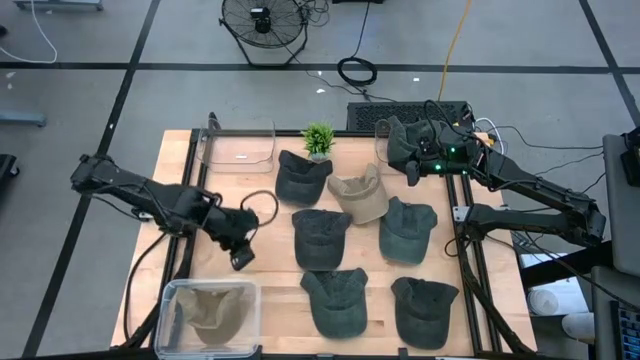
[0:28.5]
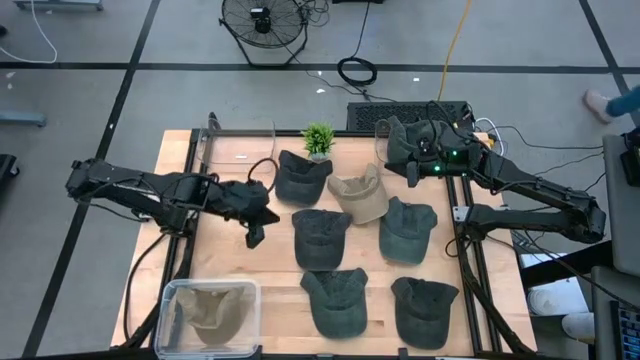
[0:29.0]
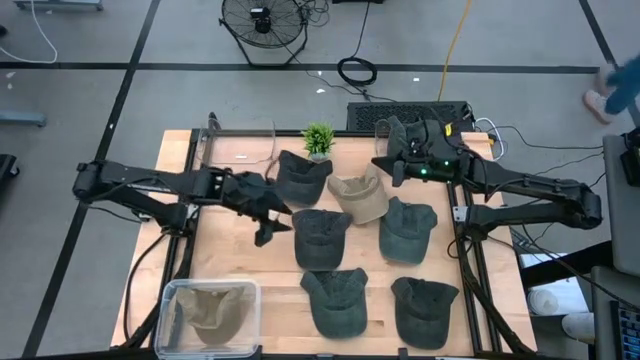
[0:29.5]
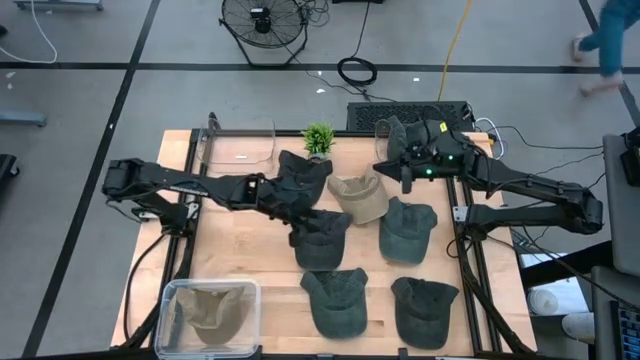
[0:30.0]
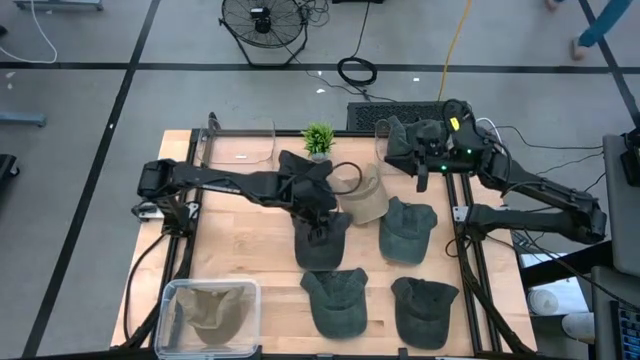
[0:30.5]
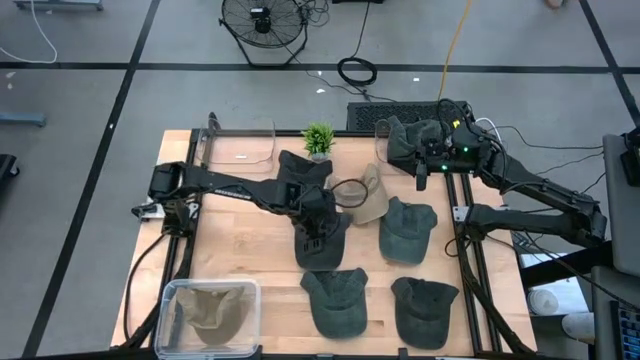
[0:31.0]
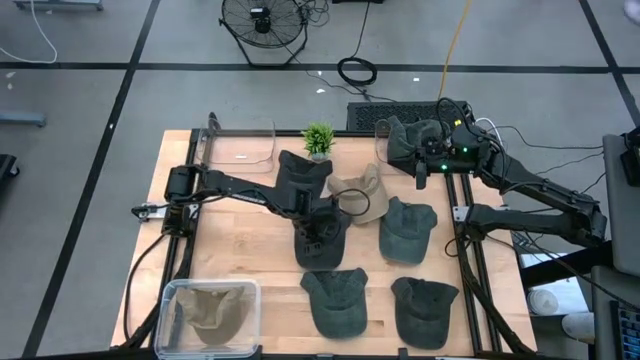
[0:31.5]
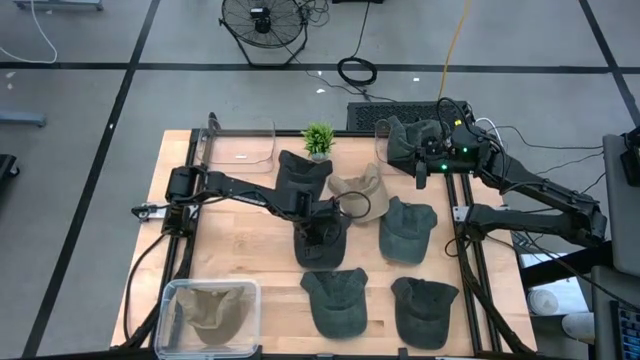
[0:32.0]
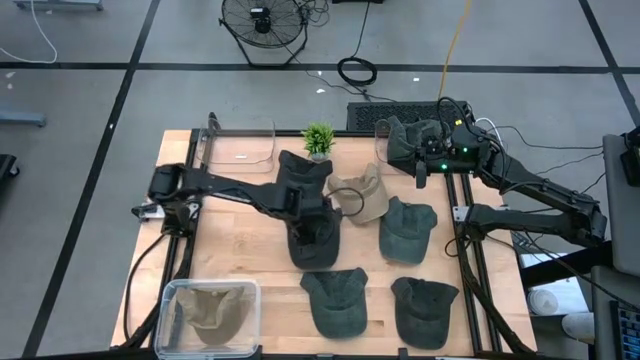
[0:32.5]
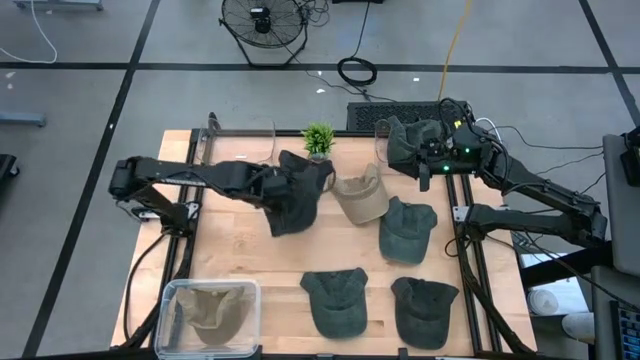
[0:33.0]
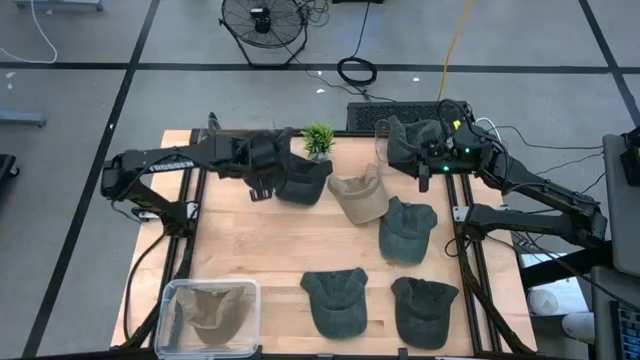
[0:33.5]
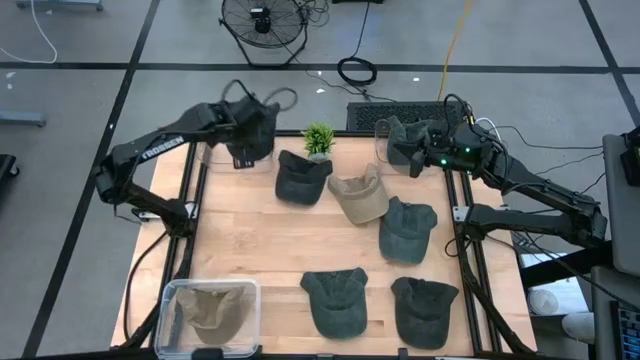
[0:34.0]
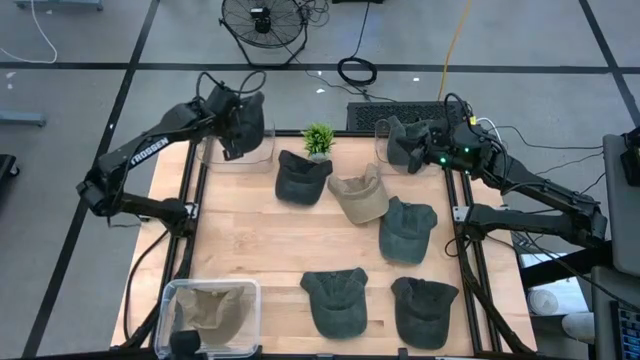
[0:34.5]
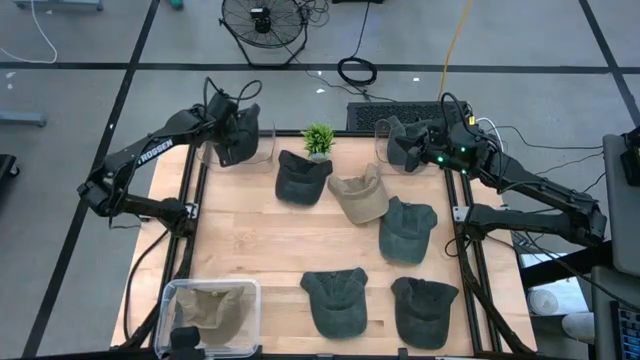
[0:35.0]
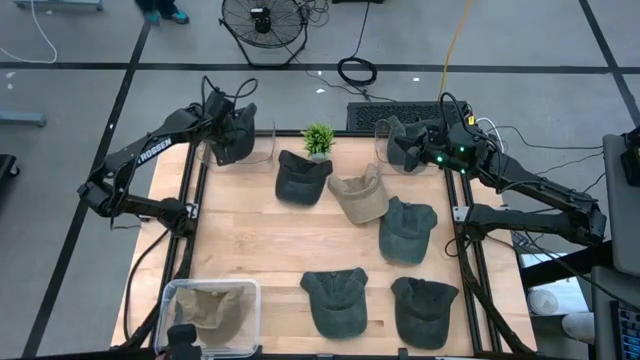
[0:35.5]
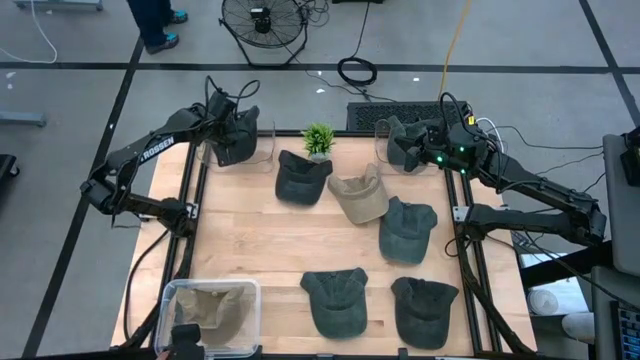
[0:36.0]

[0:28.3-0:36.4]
Task: Pick & Place hat
Put the middle black cap into the left transparent bin

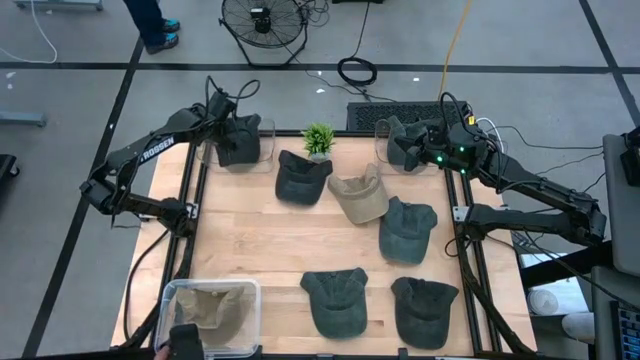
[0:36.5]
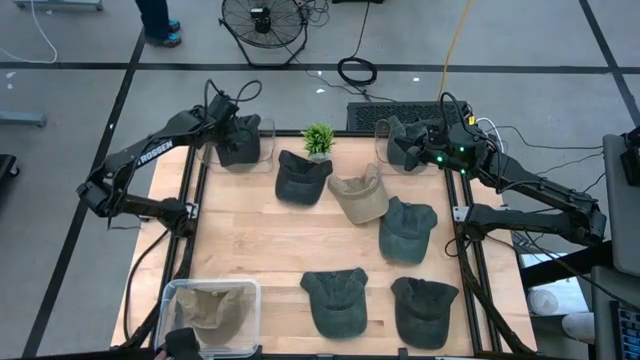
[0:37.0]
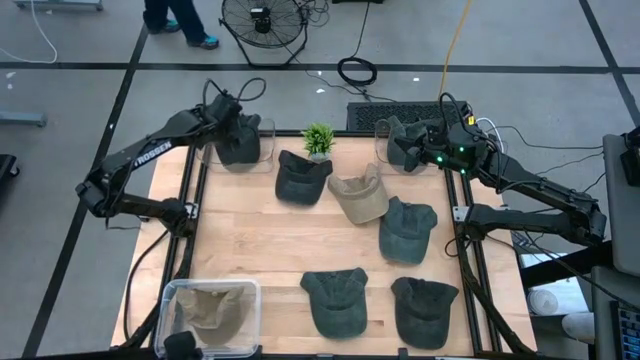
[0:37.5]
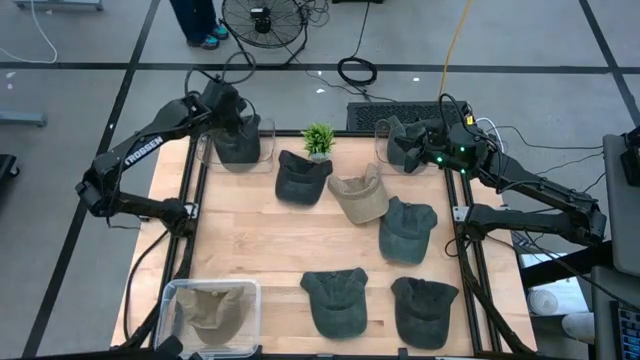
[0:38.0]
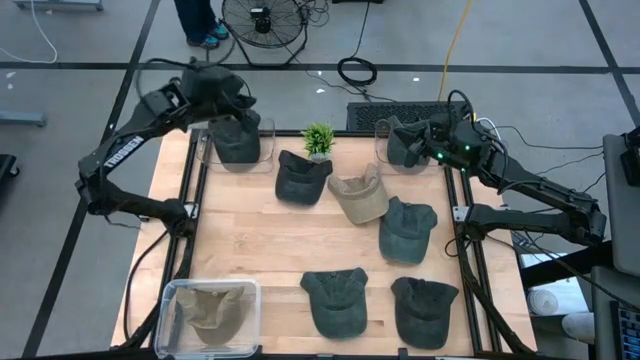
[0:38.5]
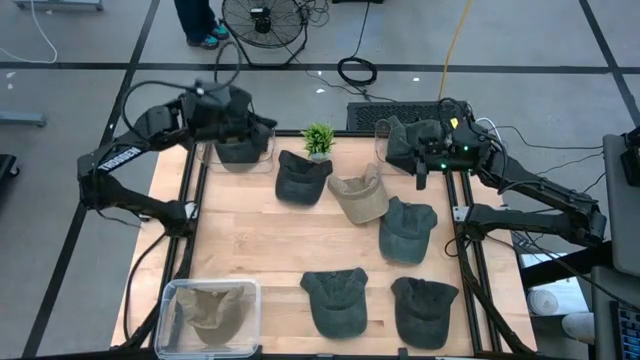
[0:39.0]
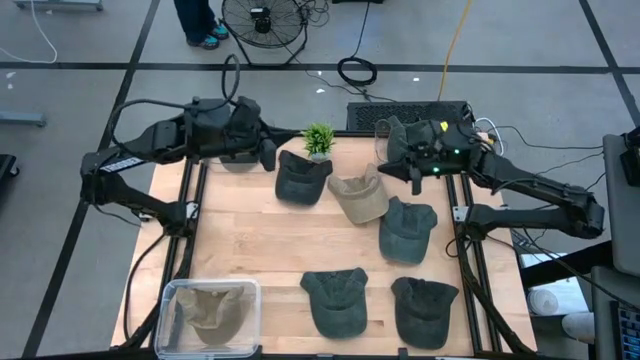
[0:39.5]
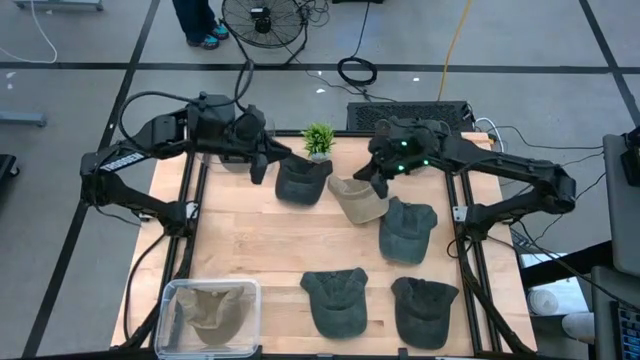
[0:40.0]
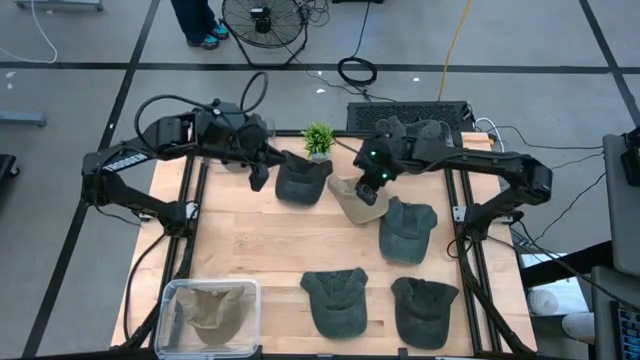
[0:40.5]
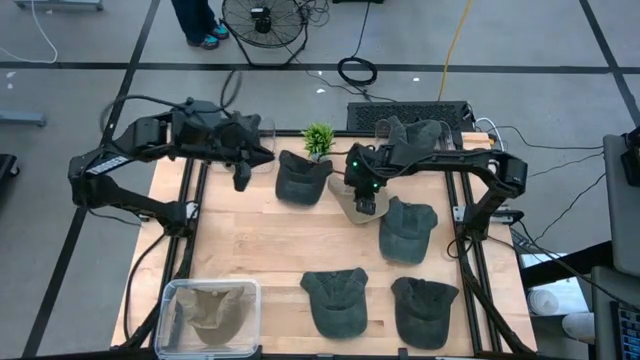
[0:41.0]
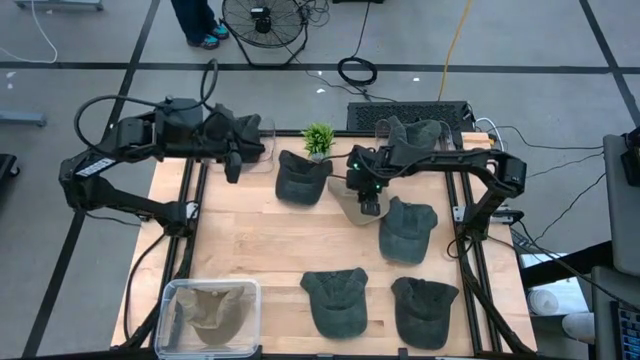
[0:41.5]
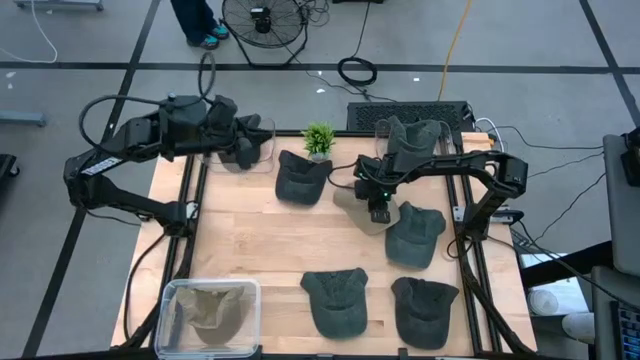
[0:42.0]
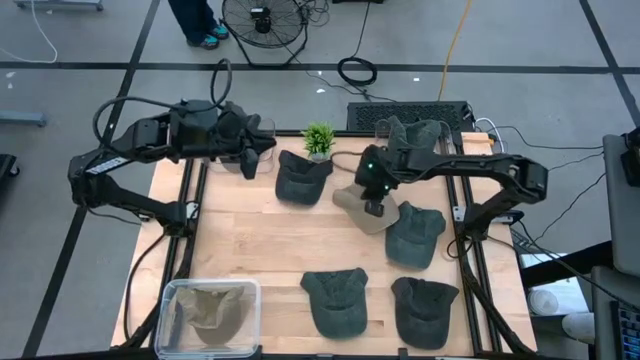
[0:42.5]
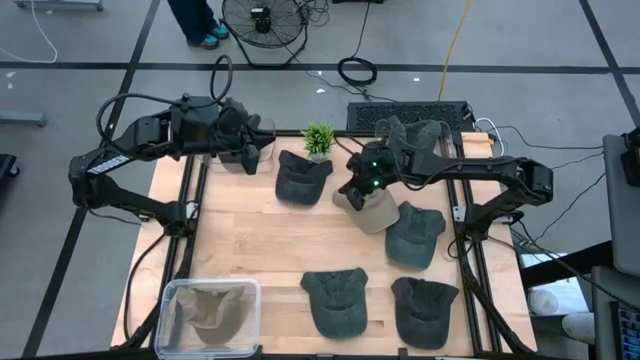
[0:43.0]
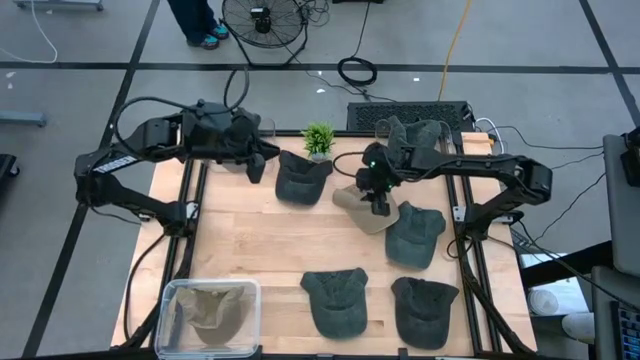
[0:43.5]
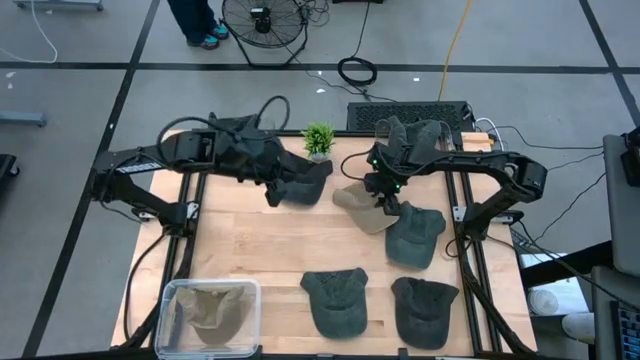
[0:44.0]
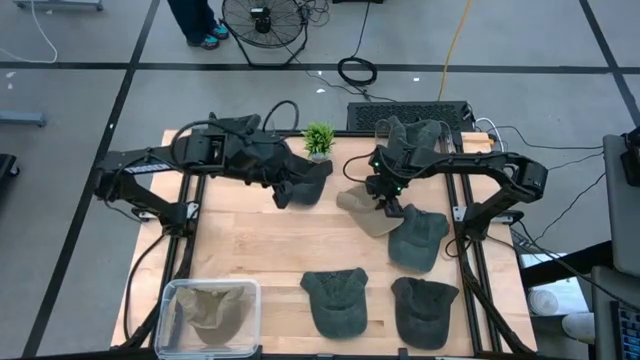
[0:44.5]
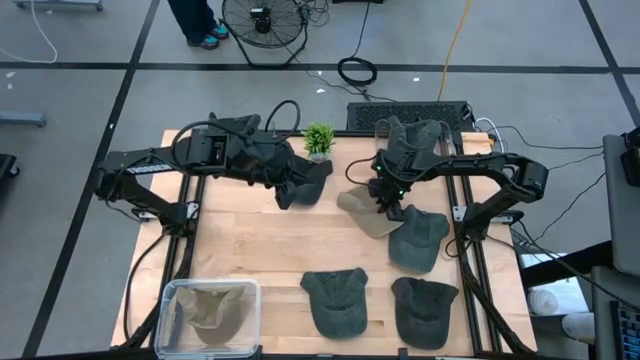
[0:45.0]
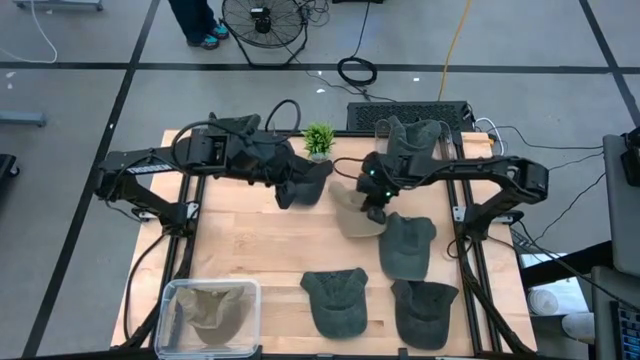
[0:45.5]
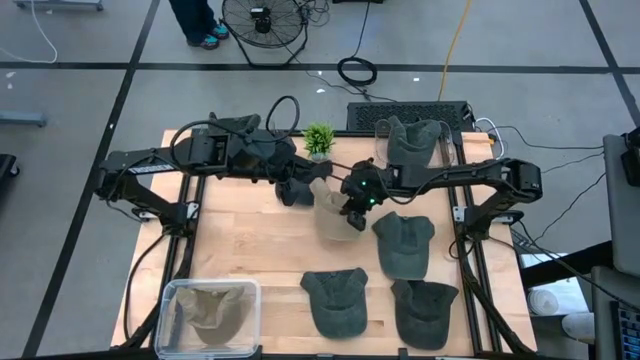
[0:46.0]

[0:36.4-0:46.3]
Put the brown cap into the transparent container

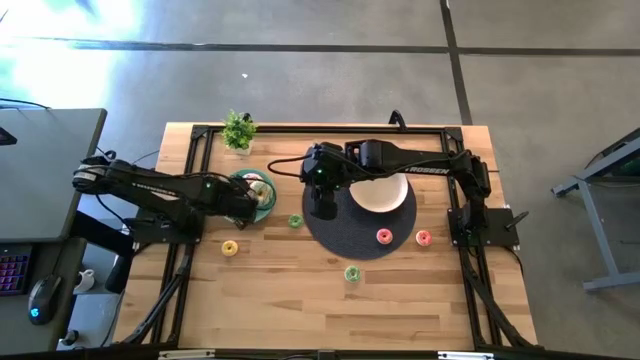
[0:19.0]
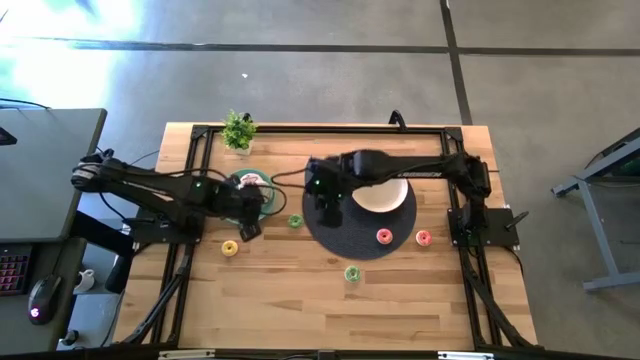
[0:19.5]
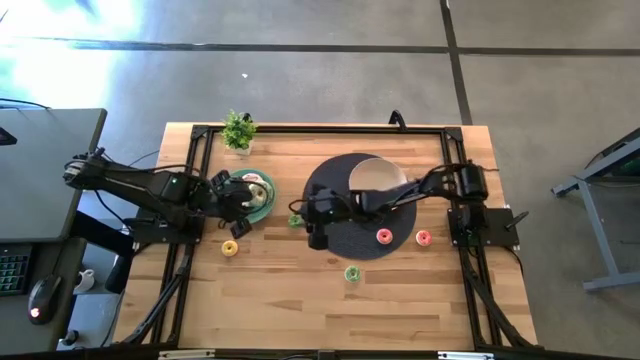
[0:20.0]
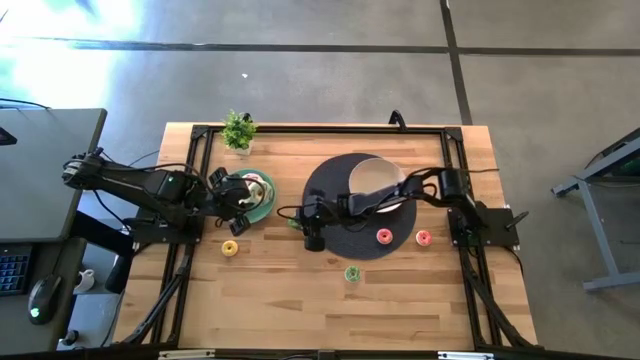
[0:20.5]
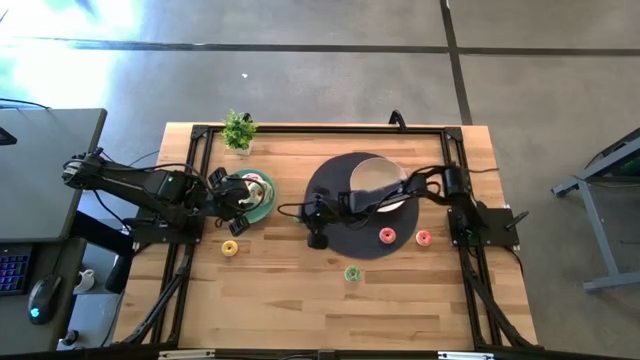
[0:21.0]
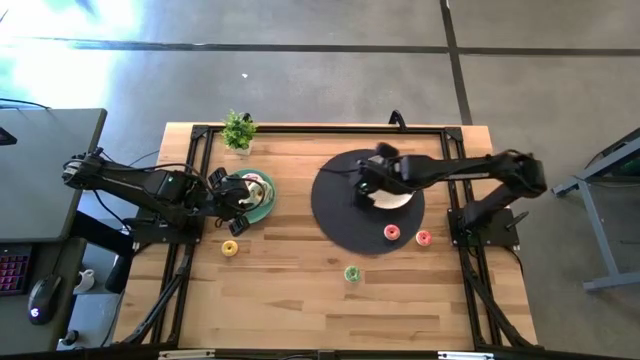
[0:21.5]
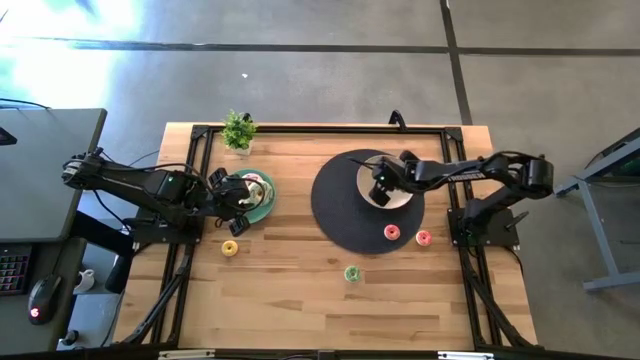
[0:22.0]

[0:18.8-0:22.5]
Task: Pick & Place donuts
Put the top green donut into the white plate
